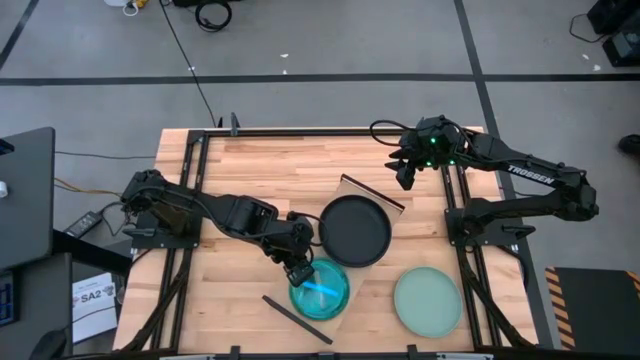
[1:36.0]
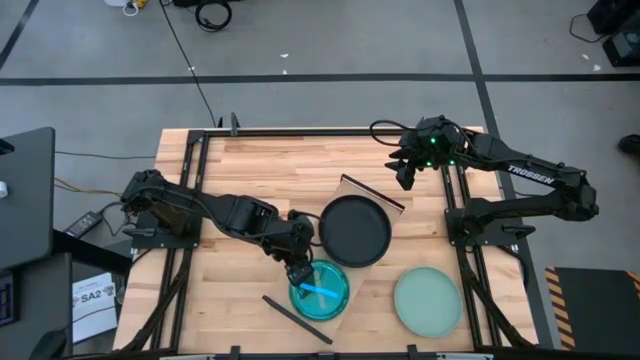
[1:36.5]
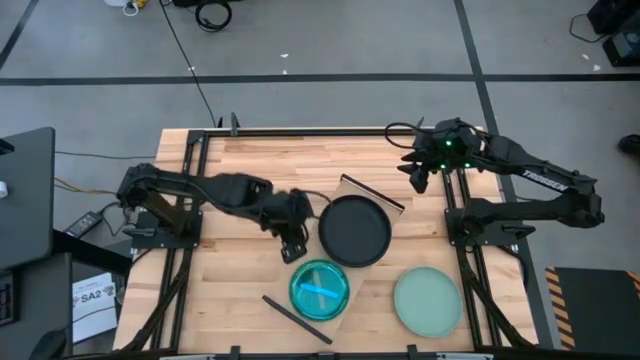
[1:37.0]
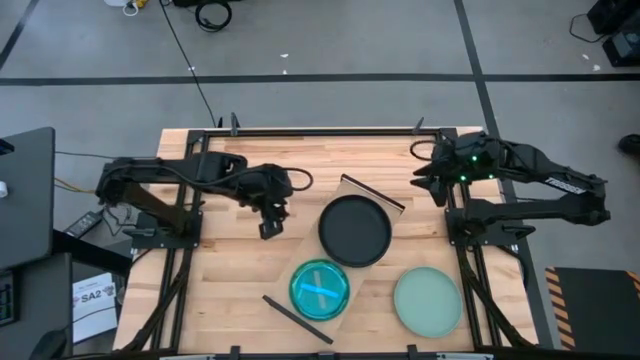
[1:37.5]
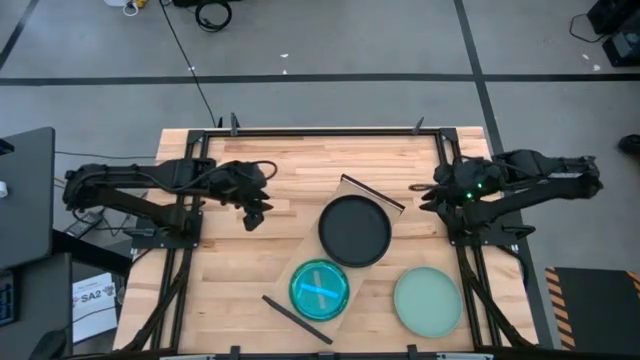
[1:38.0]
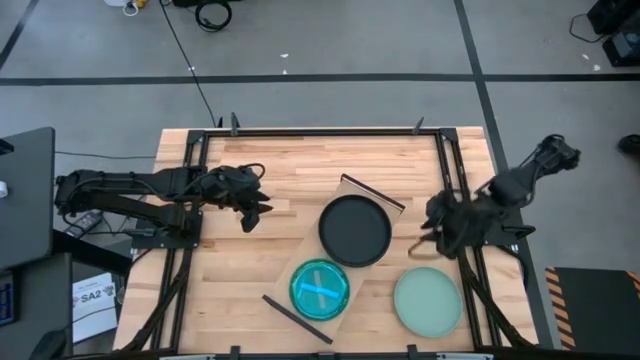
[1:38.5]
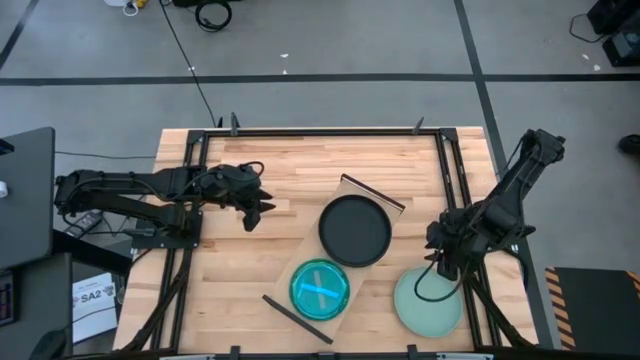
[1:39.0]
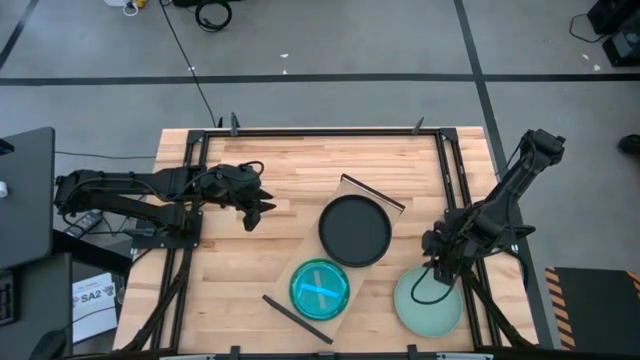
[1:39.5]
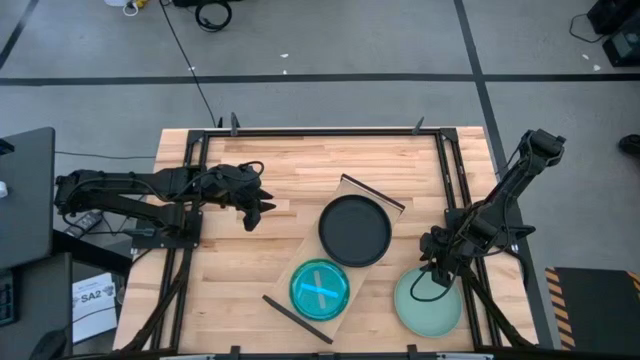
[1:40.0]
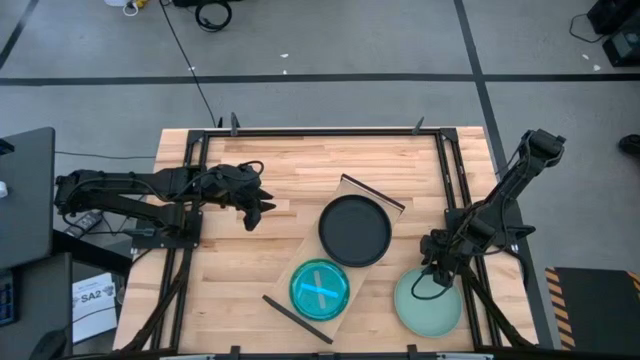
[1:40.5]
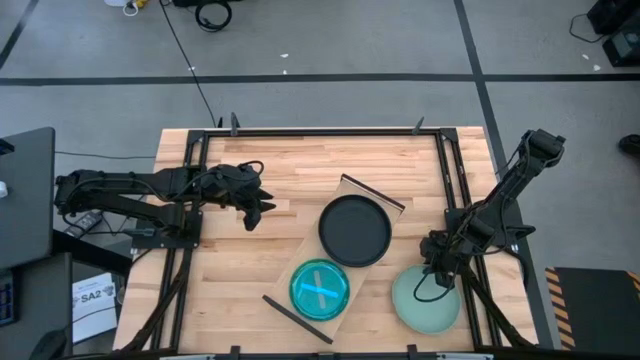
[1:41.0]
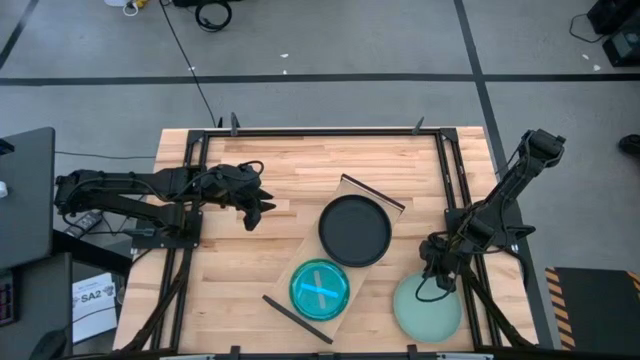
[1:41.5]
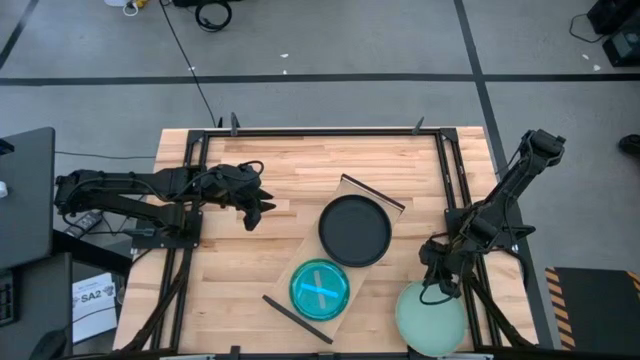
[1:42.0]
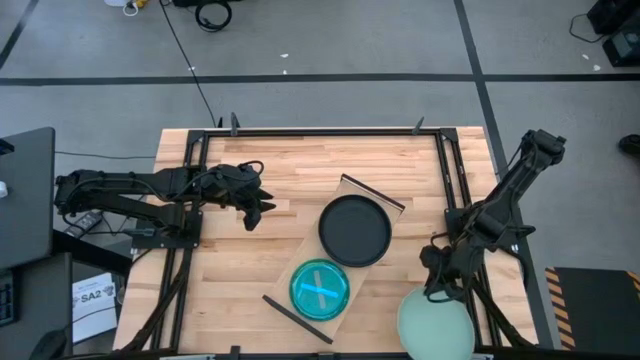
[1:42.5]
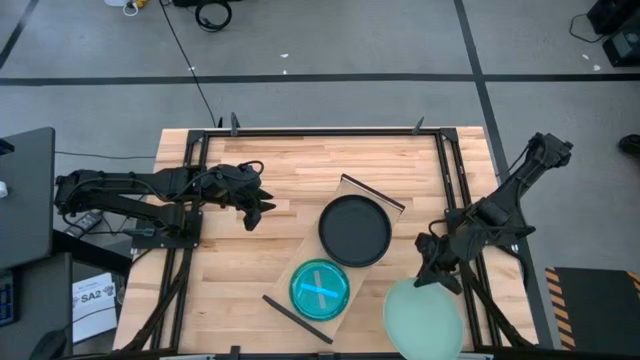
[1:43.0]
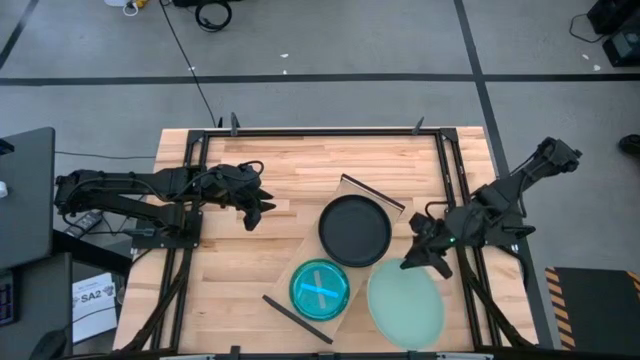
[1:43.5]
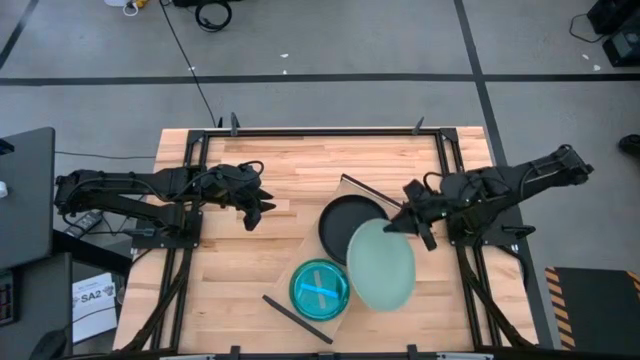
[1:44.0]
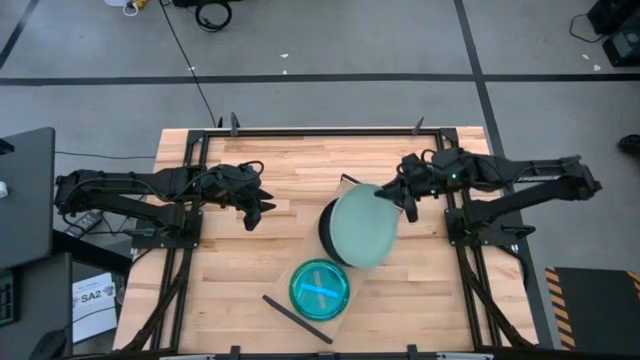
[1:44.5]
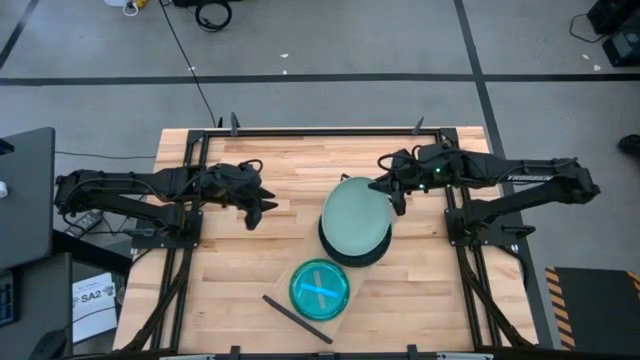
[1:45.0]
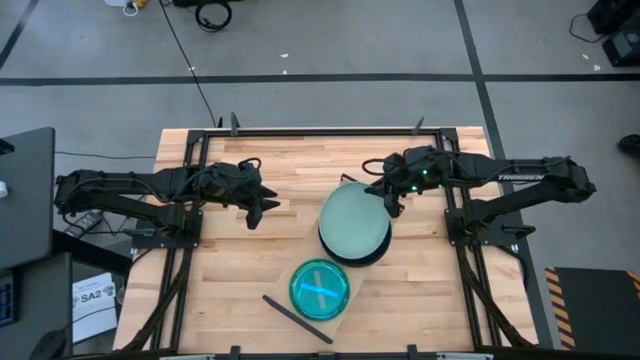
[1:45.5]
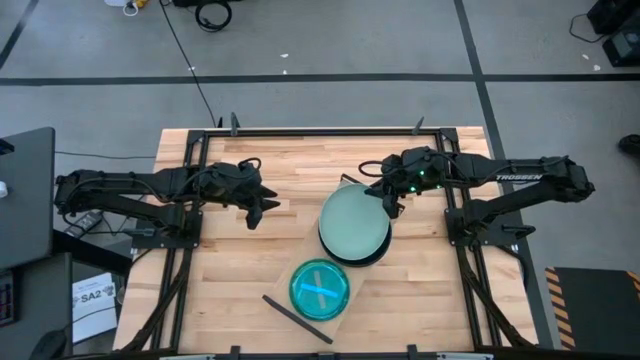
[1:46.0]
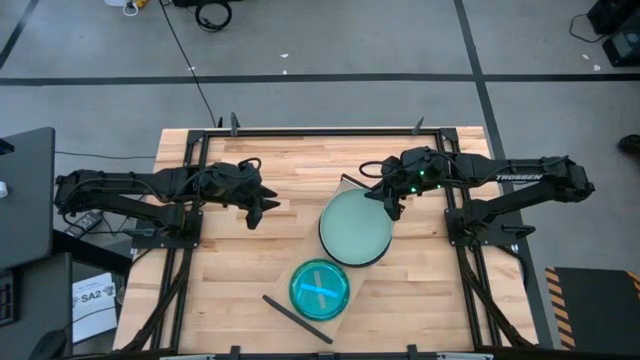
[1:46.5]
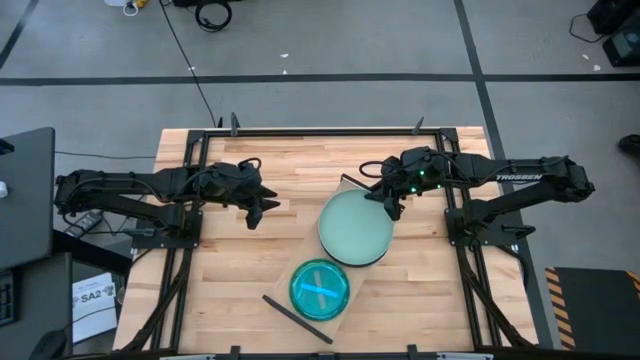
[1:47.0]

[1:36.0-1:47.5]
Task: Place and stack plates onto a shelf
Stack the gray plate on top of the black plate on the shelf

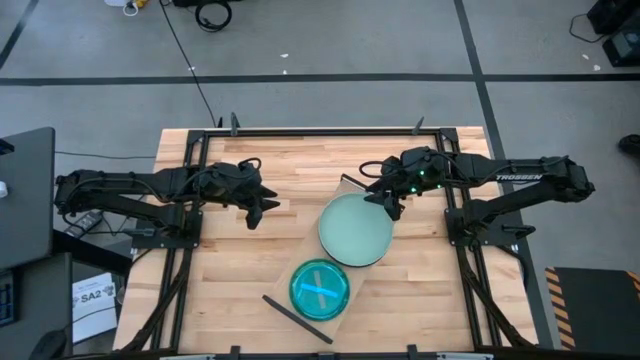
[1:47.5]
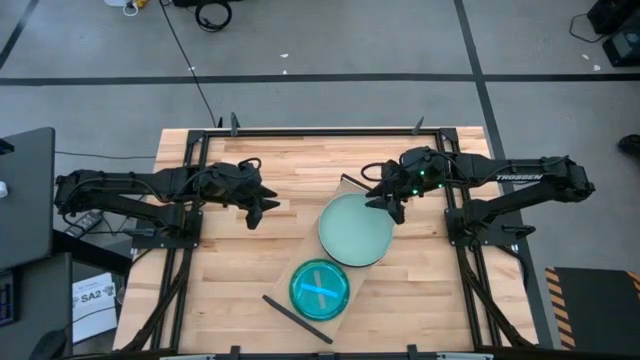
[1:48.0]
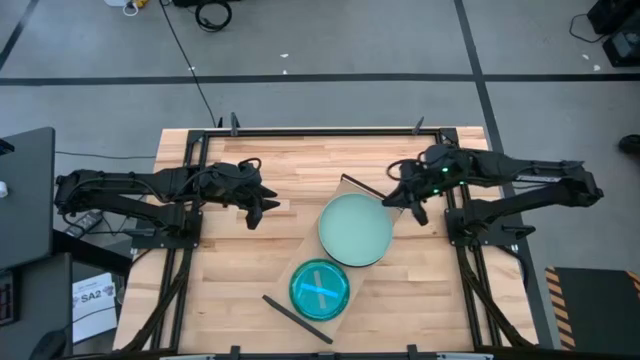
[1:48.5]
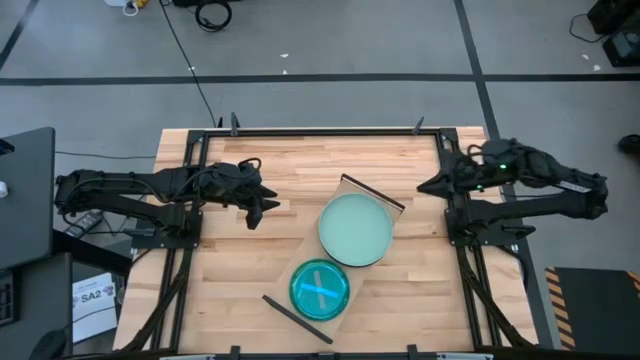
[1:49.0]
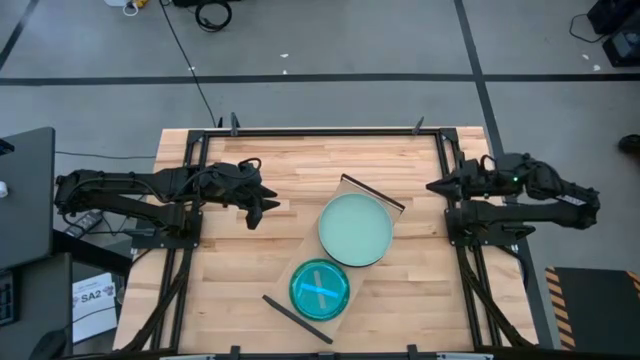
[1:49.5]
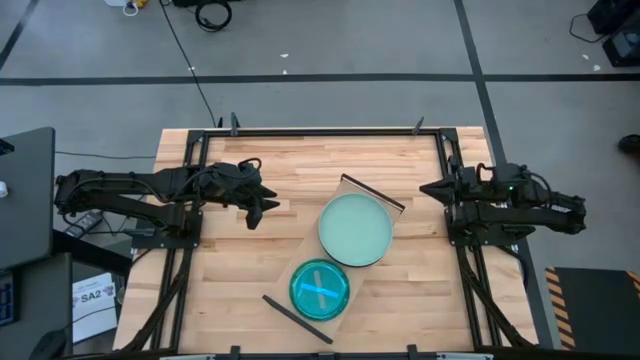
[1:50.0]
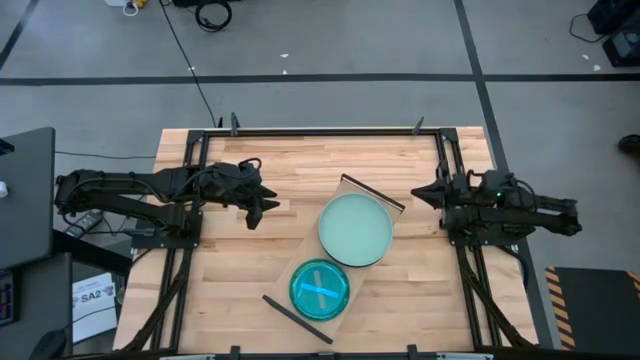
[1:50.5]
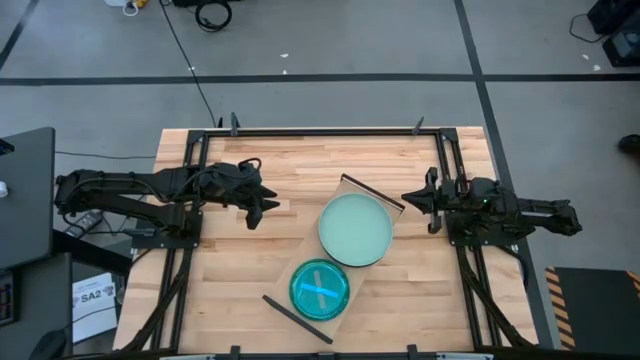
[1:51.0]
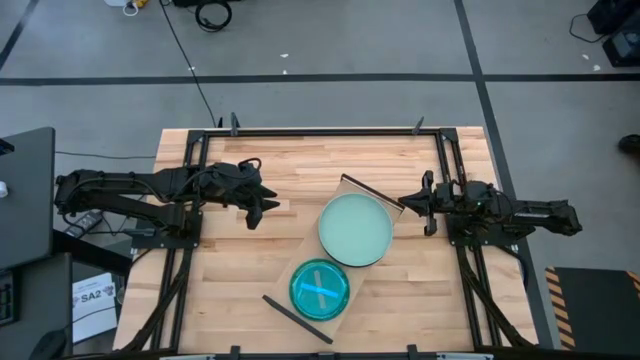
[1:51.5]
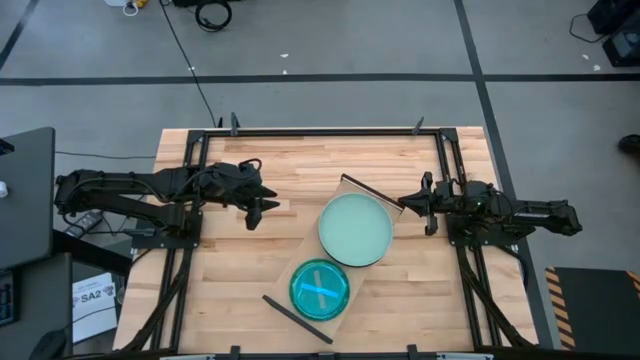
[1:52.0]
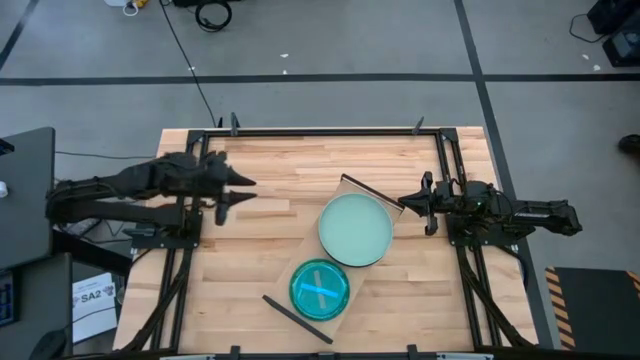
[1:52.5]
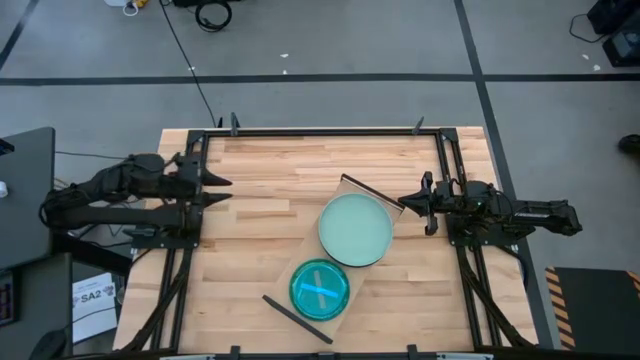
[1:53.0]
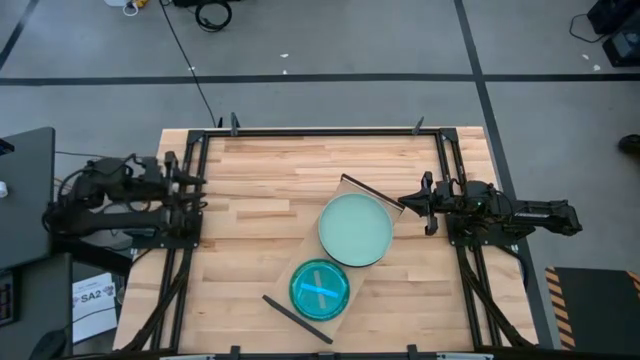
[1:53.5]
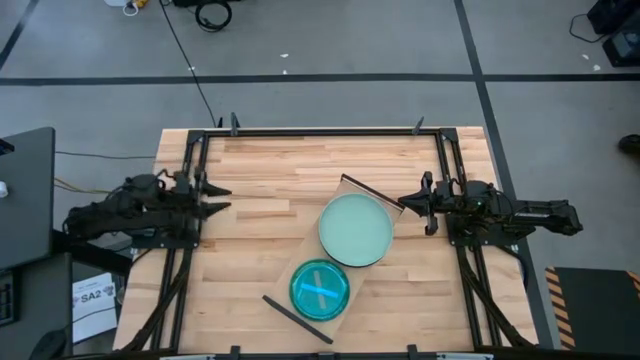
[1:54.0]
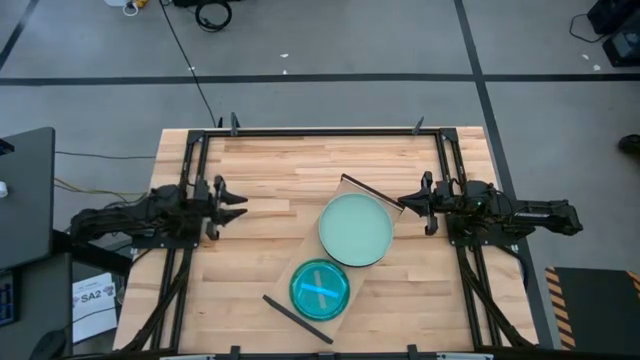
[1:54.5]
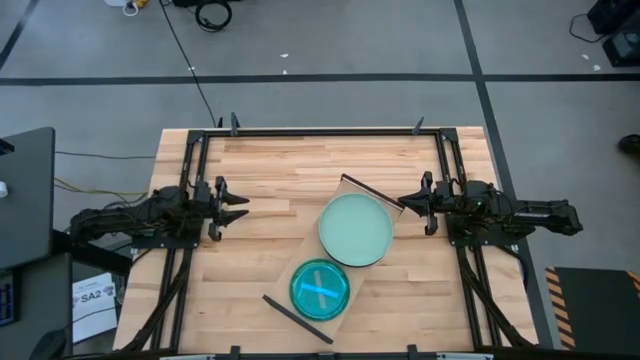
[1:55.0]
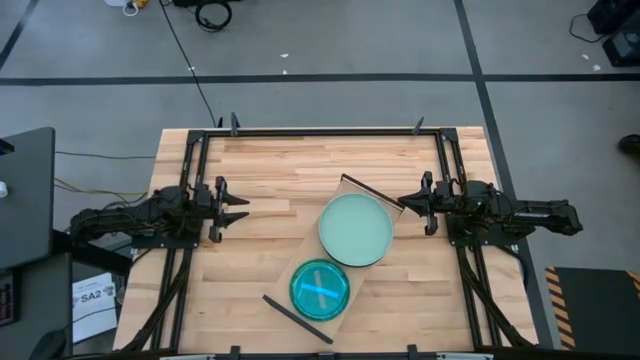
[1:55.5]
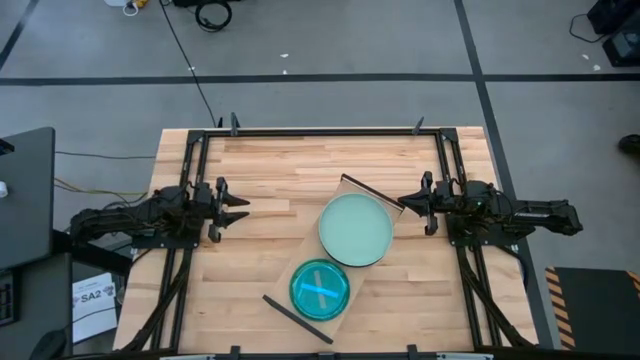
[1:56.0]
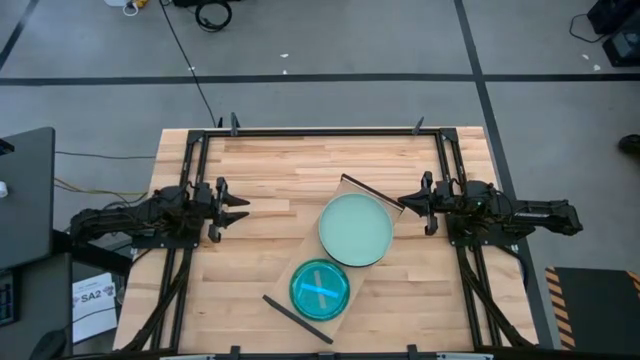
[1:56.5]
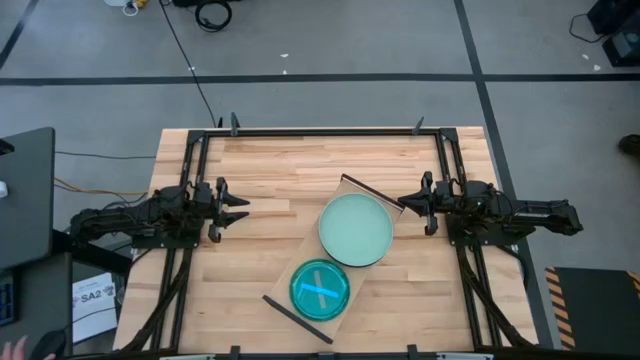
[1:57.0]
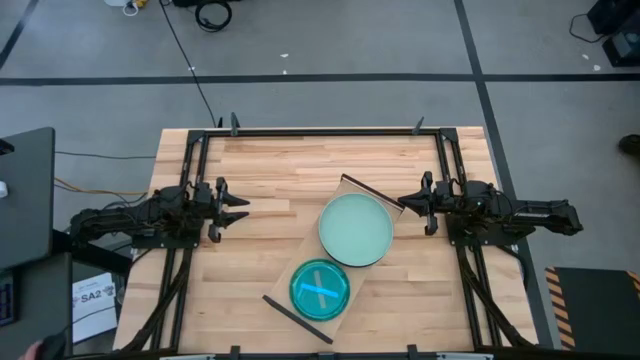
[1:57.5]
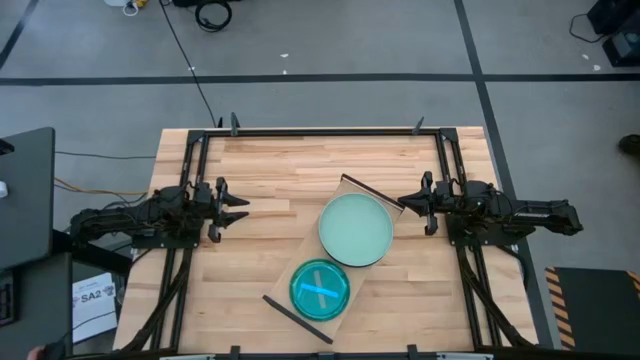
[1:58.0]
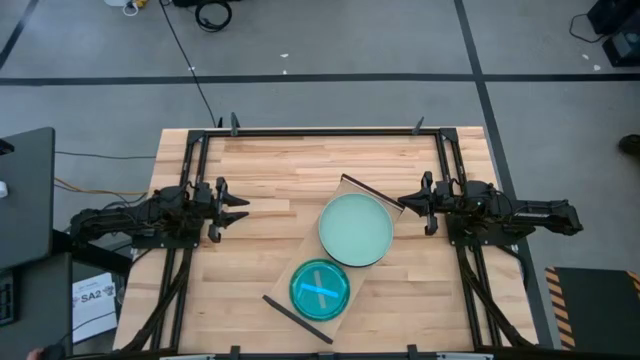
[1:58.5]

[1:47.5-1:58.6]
Return to Home Position
